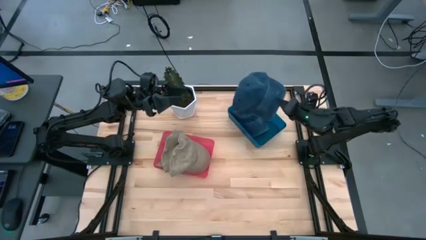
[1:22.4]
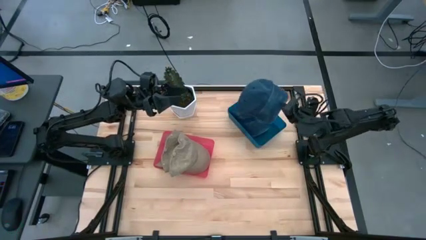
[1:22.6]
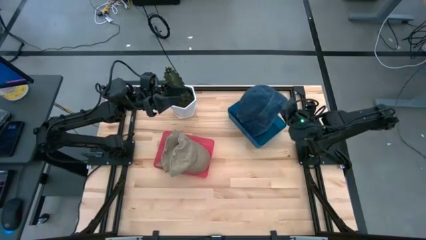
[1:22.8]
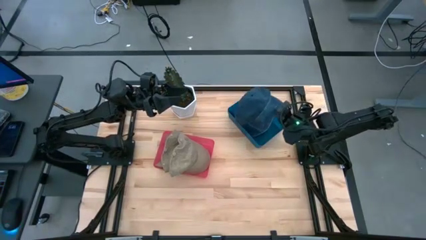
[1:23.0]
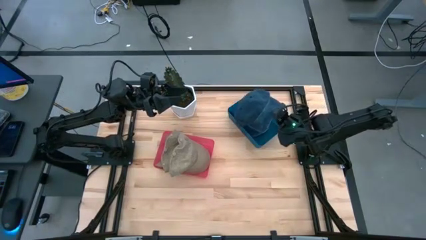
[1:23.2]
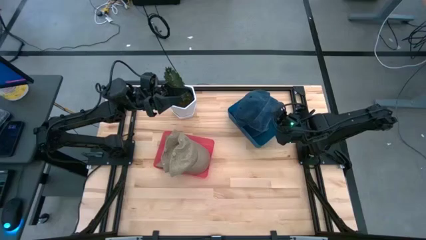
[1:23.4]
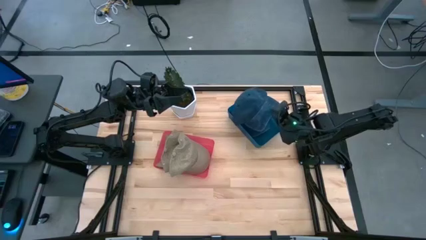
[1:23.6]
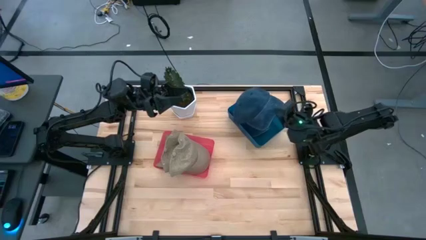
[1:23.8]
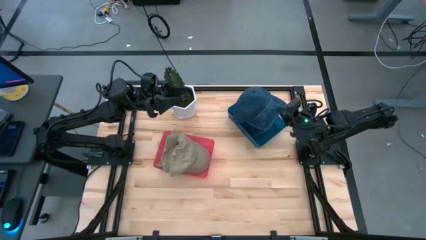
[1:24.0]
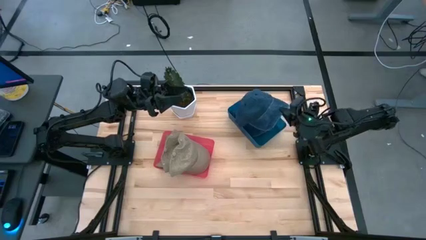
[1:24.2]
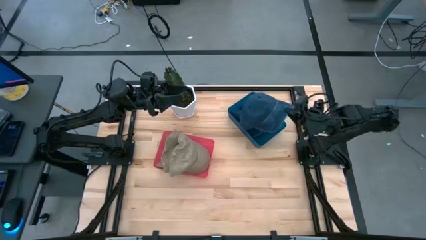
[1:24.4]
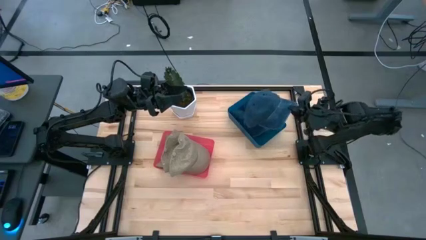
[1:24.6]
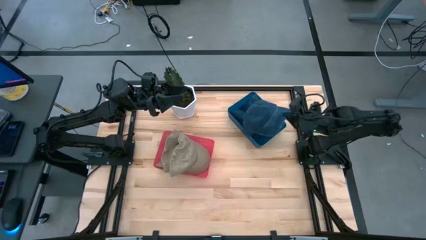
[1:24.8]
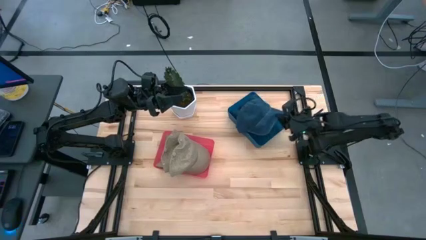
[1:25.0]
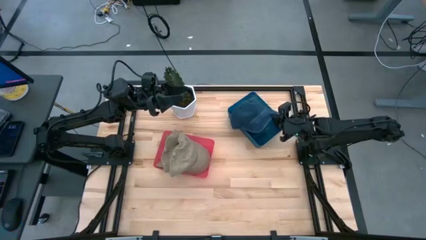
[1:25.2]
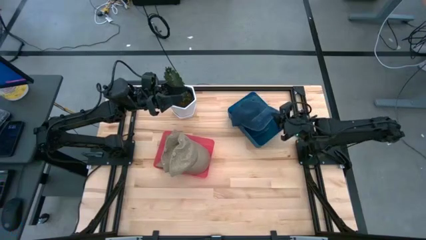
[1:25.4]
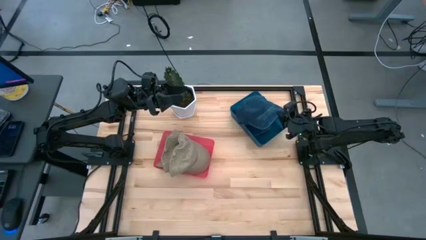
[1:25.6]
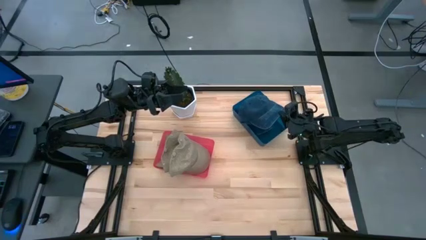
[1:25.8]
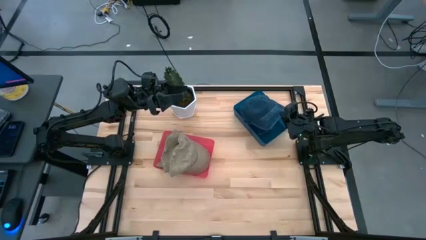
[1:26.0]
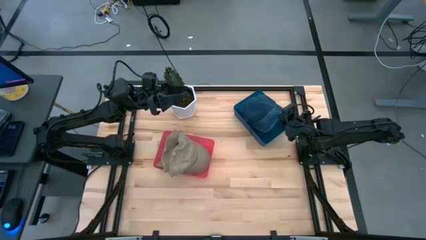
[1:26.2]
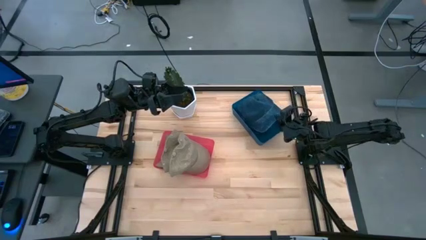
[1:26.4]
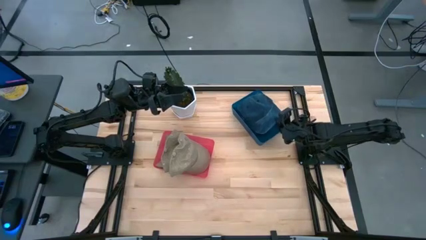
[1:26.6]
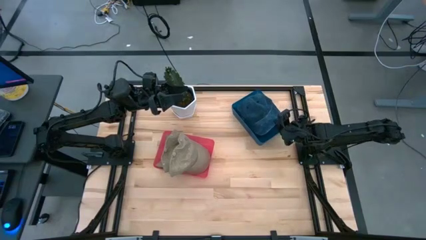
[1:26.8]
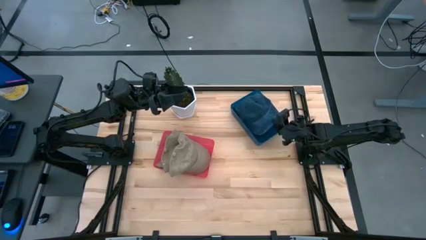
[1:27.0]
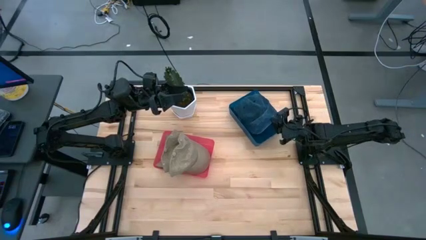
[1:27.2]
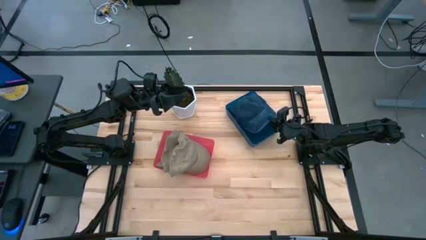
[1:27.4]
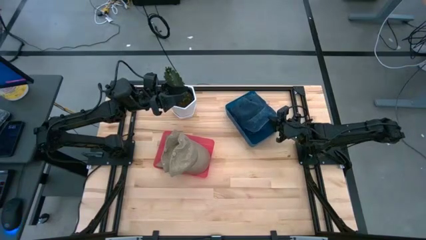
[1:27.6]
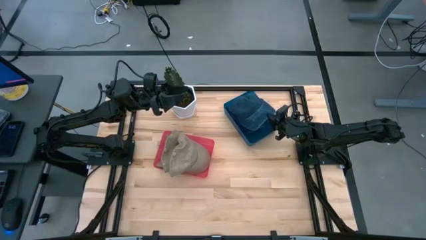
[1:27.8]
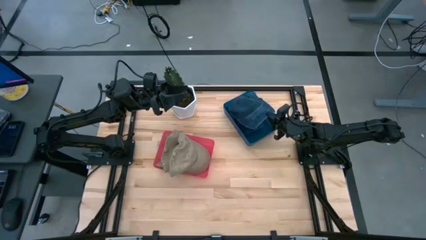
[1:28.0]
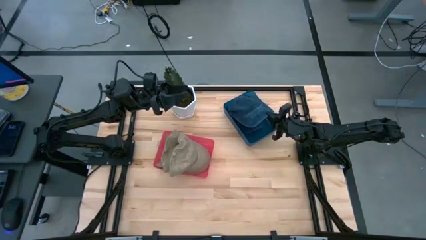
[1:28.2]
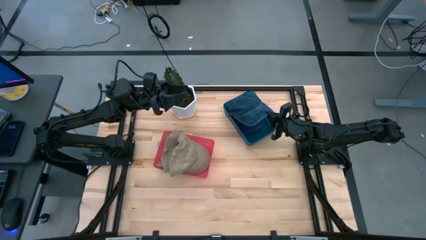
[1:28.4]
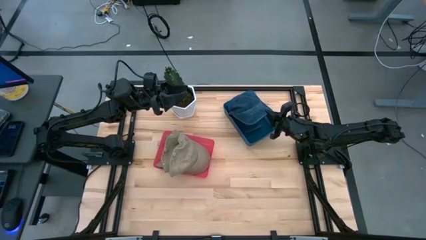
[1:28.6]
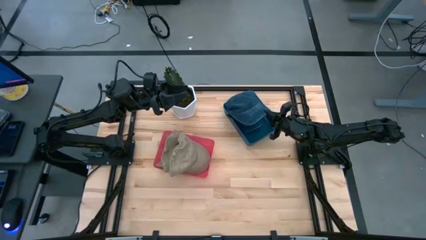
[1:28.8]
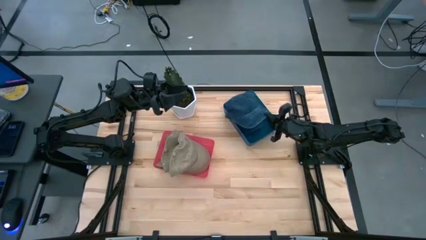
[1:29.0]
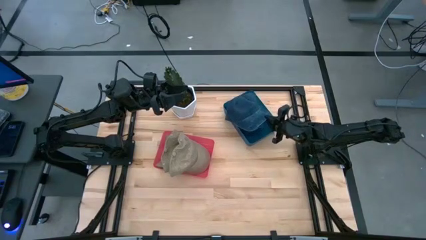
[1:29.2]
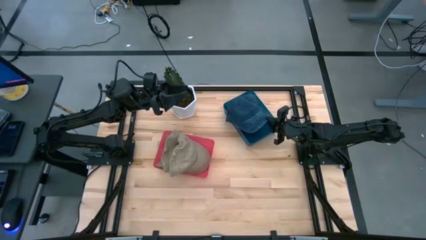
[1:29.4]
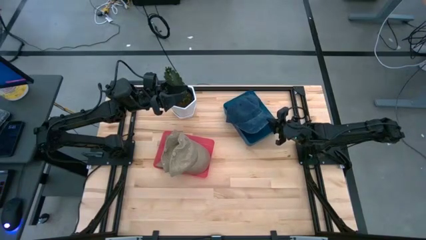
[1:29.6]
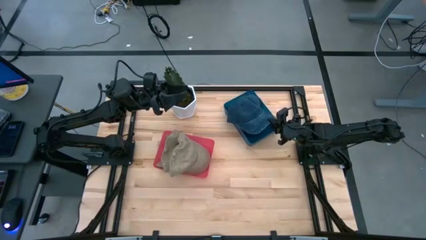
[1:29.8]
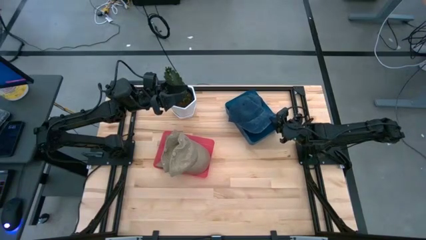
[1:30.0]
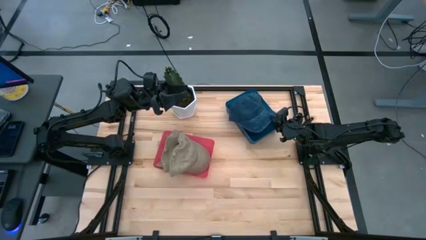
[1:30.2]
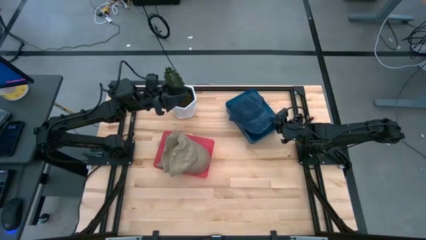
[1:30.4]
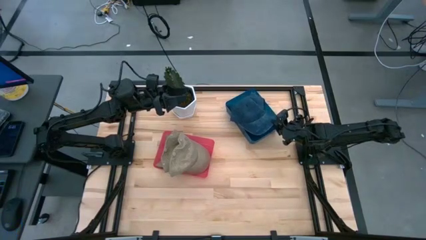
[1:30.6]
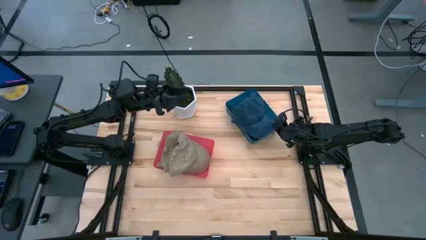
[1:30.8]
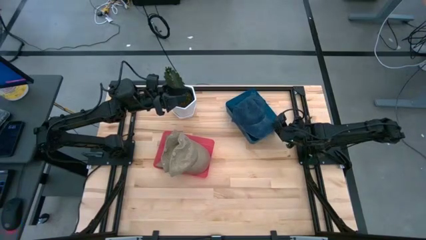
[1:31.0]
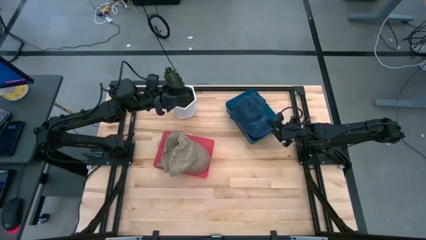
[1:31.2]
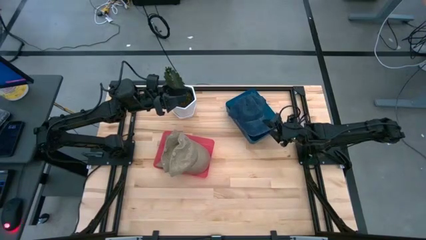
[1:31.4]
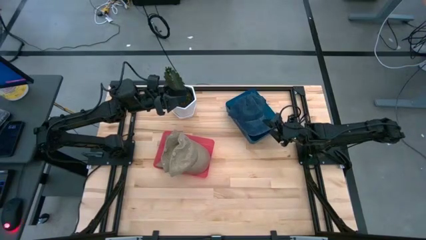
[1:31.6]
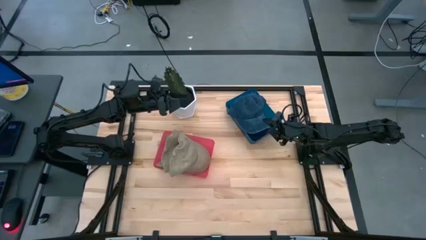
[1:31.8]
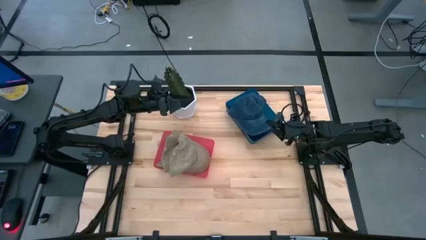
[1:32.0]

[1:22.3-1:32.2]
Task: Pick & Place hat
Put the blue cap into the blue bin

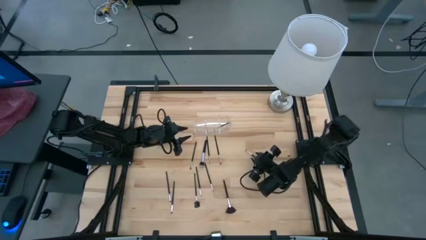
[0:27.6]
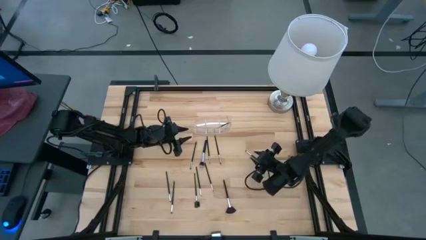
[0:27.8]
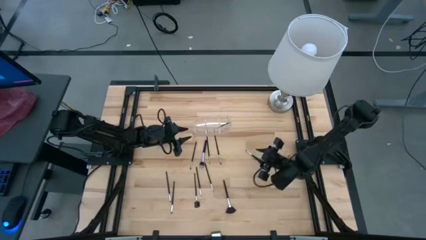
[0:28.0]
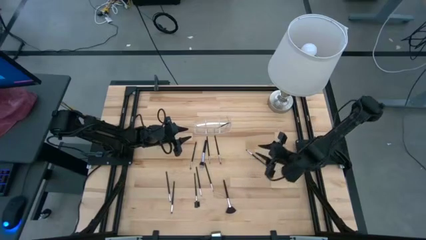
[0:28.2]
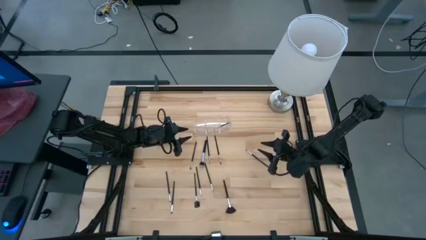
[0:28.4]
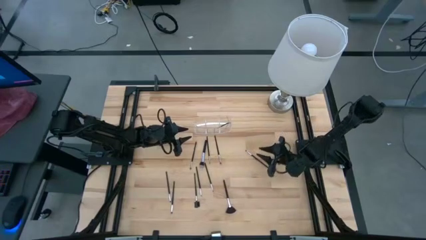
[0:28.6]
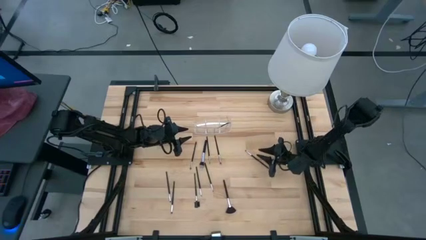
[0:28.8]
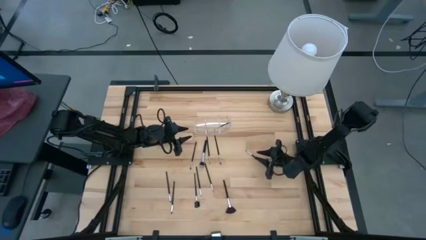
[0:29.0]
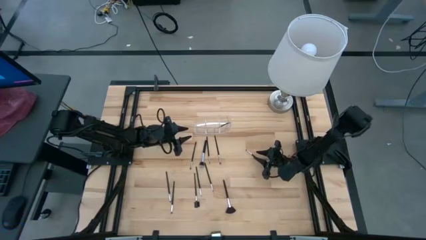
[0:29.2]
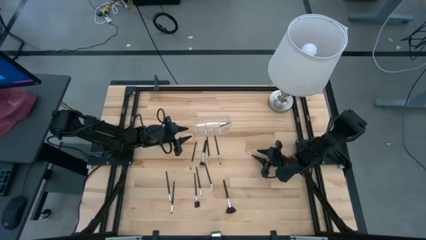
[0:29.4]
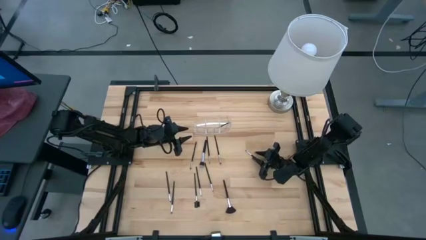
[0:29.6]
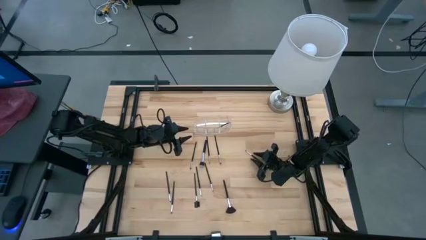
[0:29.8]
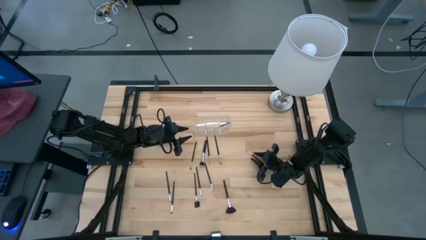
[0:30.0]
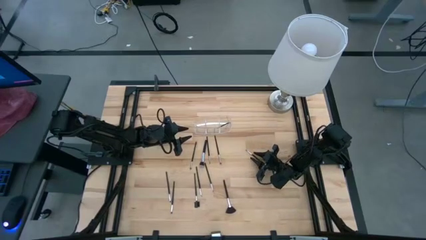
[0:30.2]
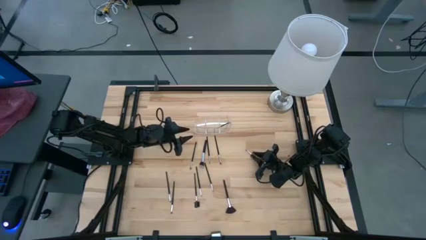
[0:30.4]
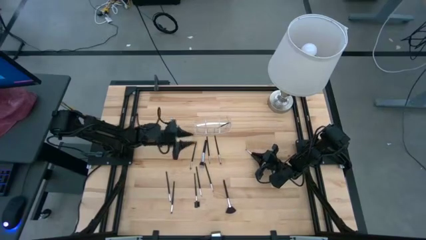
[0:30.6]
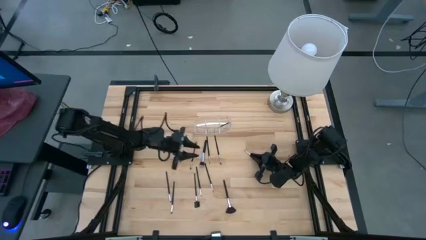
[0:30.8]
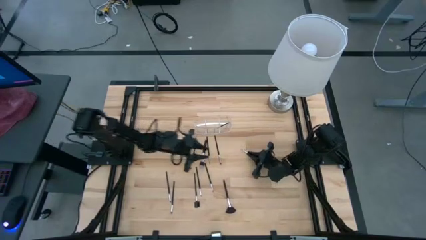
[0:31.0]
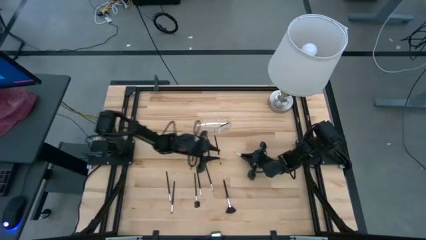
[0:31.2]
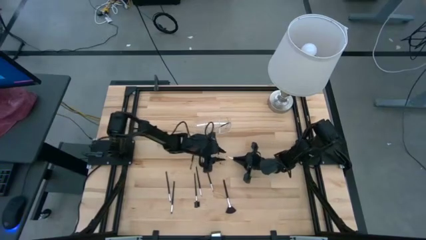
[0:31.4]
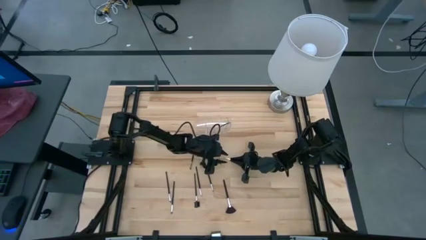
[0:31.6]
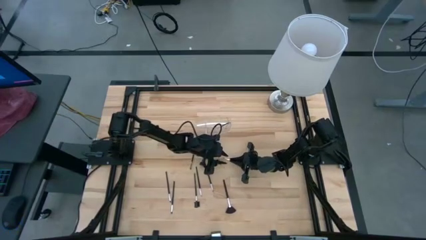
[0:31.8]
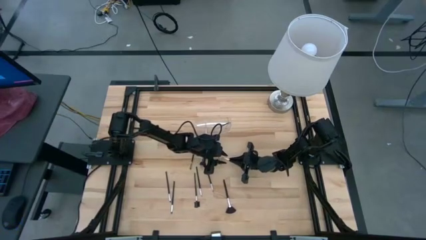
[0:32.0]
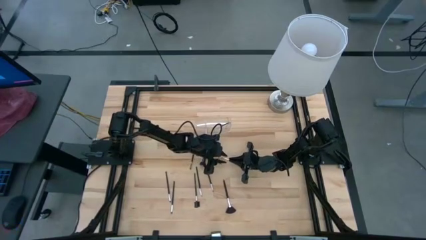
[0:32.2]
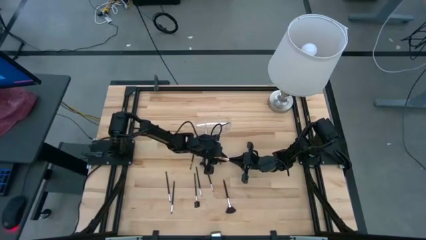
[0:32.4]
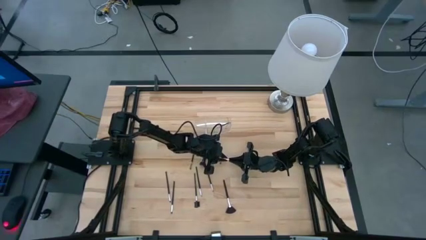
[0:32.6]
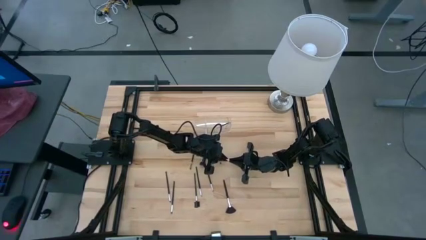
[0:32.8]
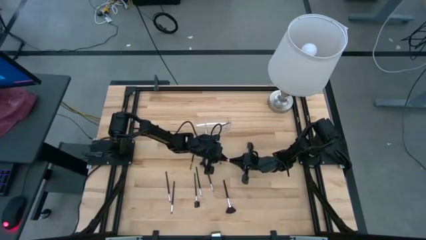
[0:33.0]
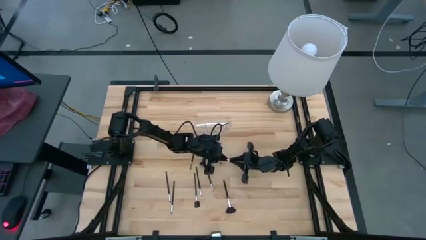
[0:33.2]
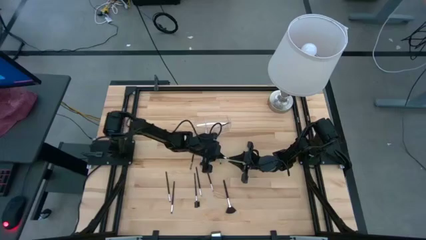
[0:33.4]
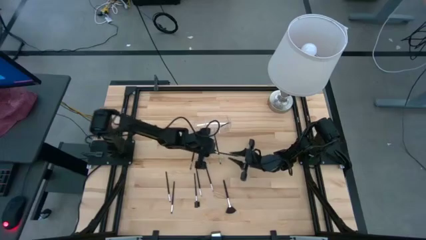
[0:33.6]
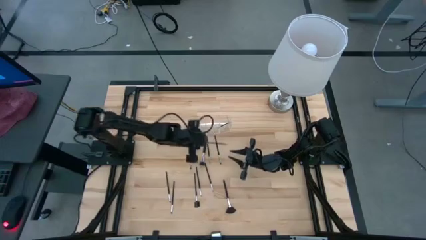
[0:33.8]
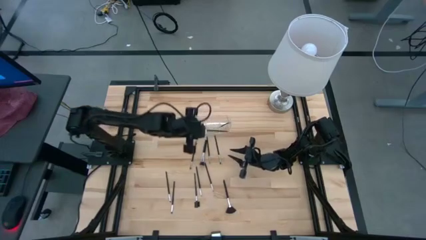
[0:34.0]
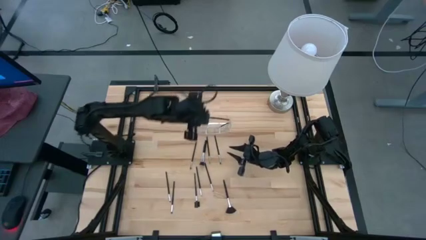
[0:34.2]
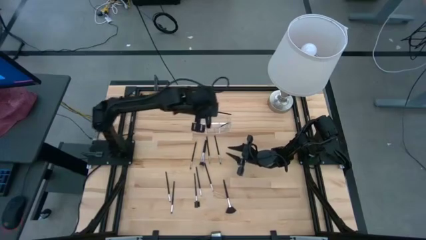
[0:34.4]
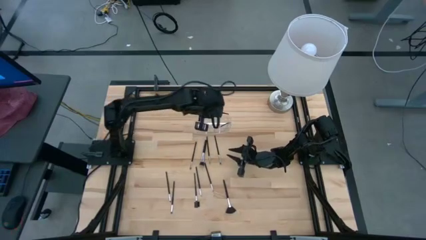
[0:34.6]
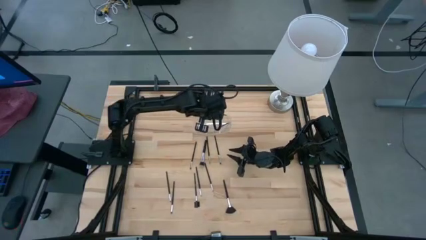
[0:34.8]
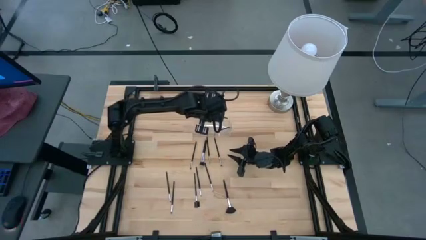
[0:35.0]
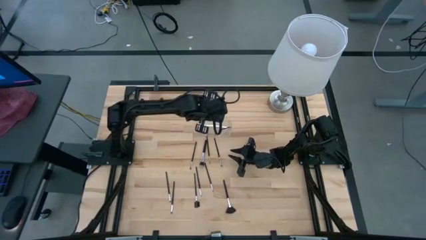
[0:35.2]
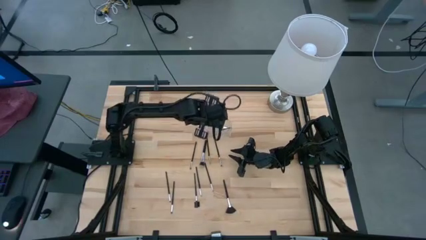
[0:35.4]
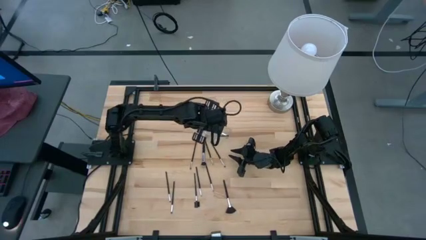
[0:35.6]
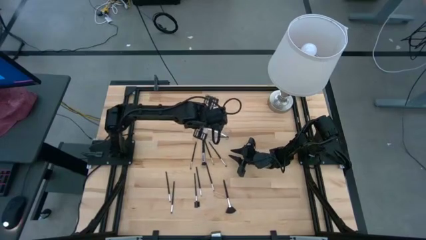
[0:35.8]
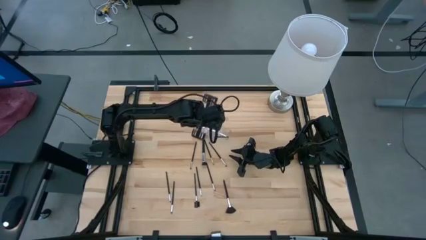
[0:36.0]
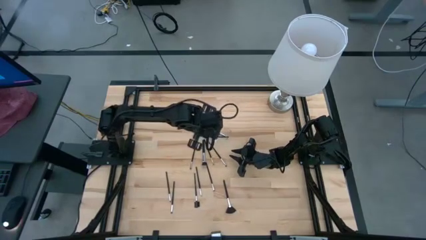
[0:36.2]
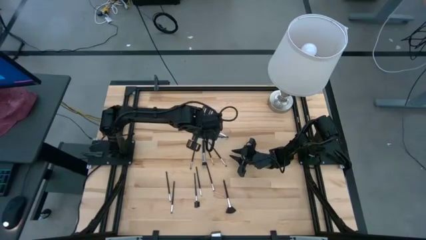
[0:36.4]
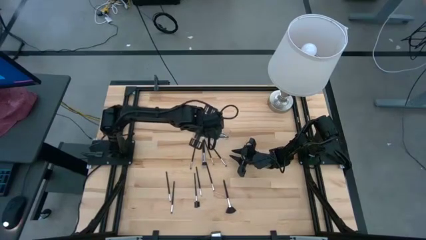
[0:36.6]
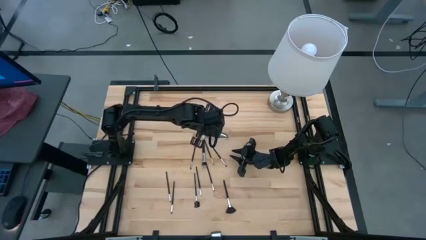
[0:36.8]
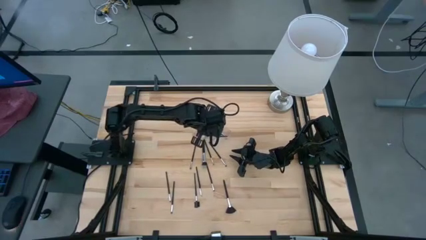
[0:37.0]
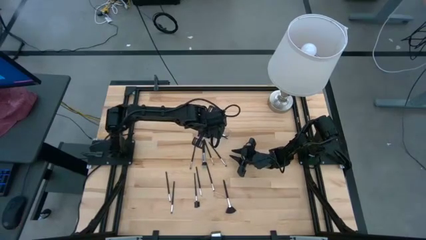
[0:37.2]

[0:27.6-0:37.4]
Task: Put items in baskets/containers
Put the black eyeshadow brush into the transparent organizer
